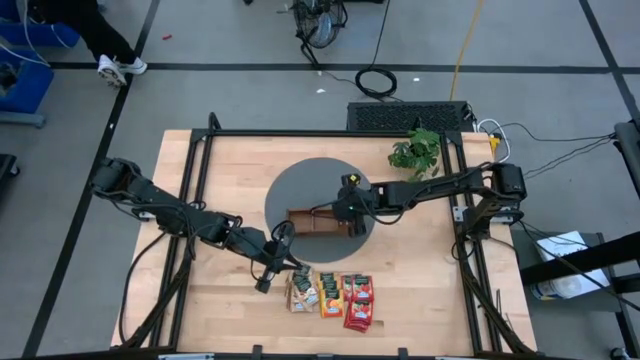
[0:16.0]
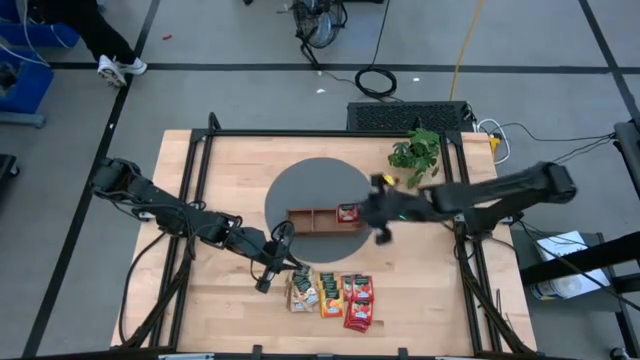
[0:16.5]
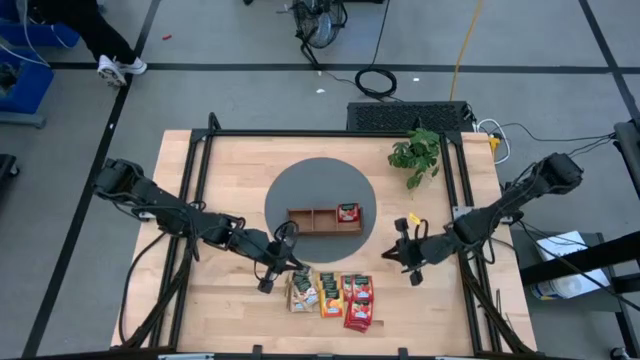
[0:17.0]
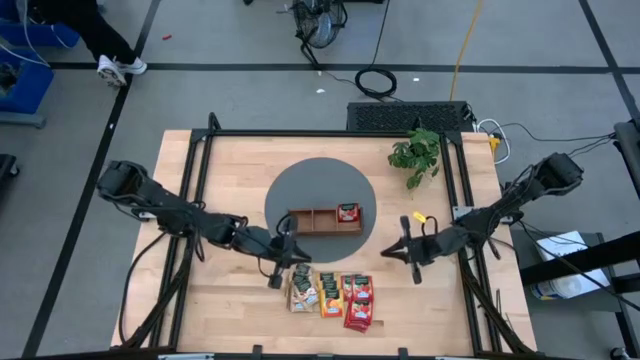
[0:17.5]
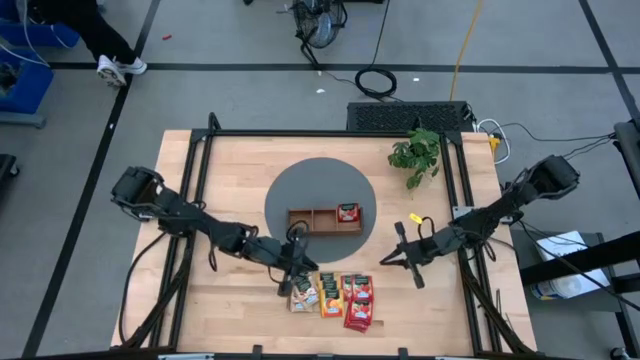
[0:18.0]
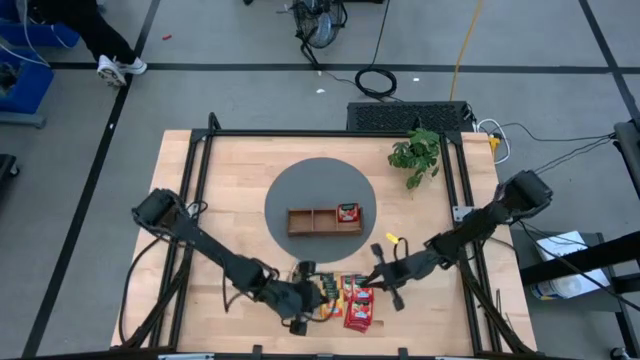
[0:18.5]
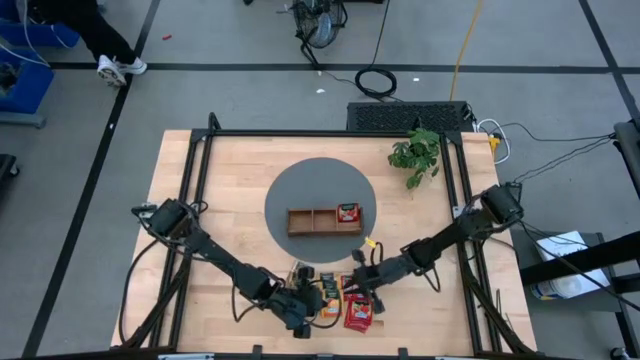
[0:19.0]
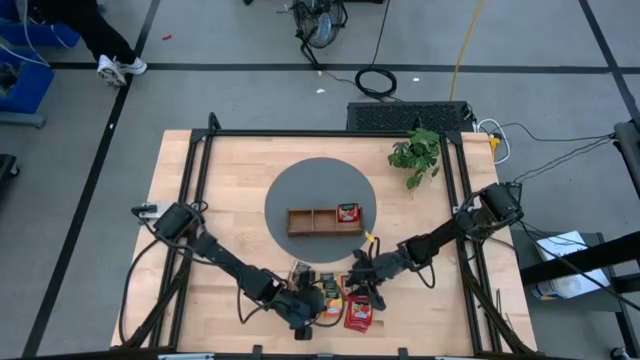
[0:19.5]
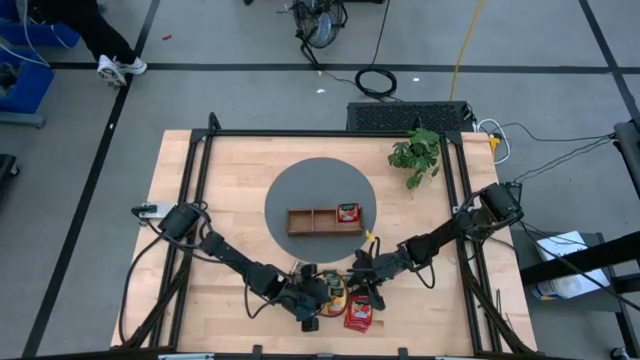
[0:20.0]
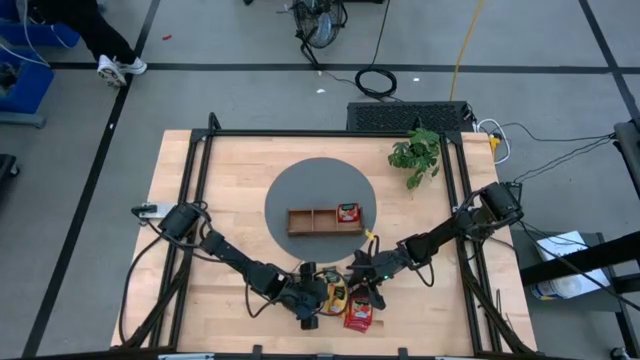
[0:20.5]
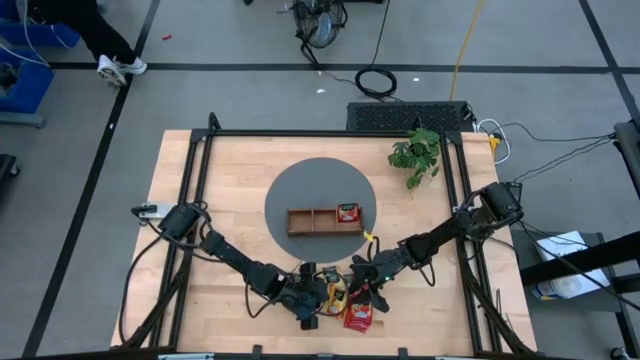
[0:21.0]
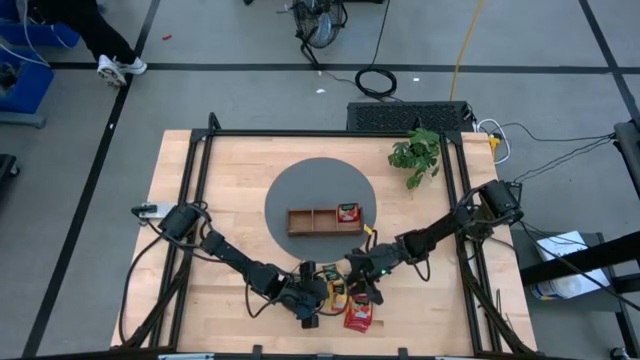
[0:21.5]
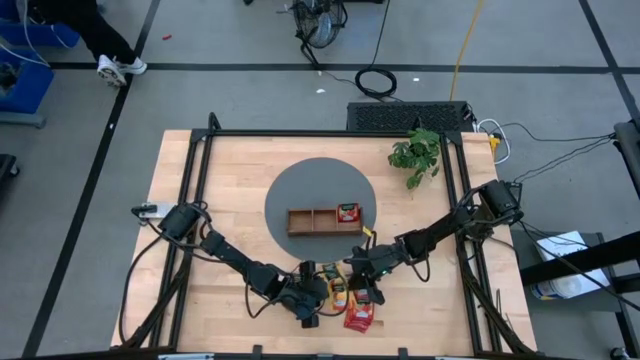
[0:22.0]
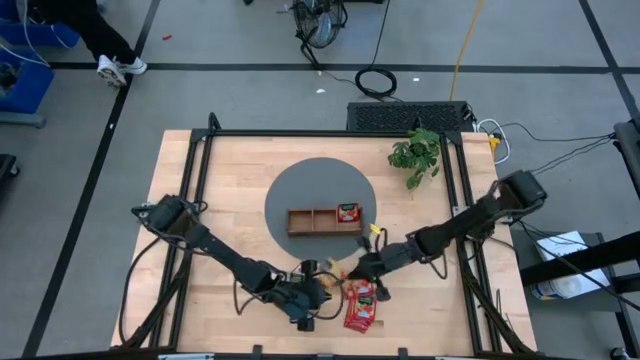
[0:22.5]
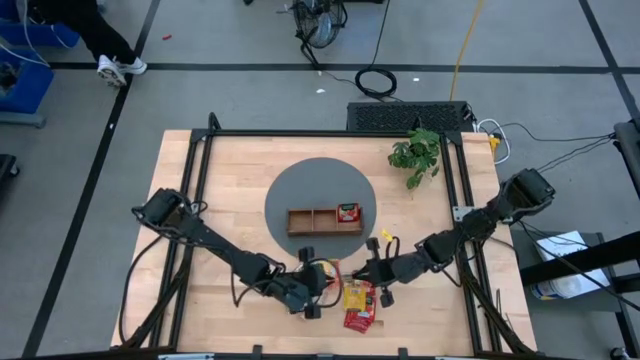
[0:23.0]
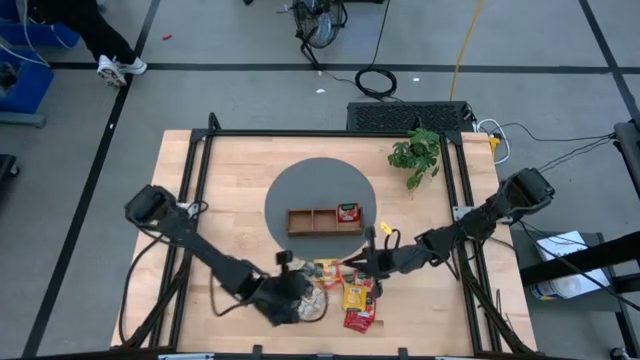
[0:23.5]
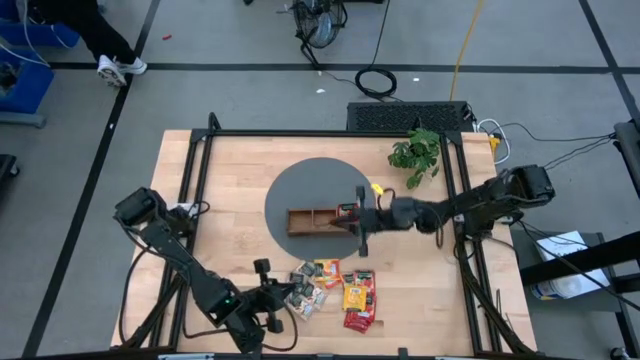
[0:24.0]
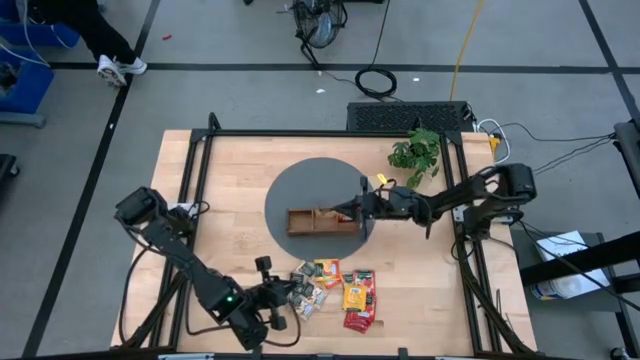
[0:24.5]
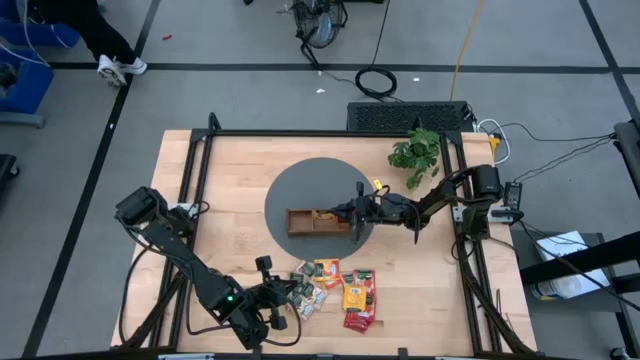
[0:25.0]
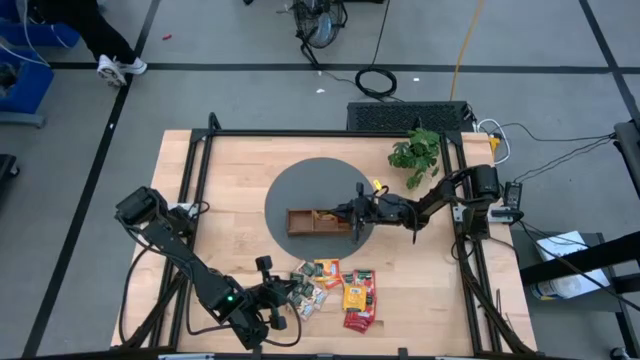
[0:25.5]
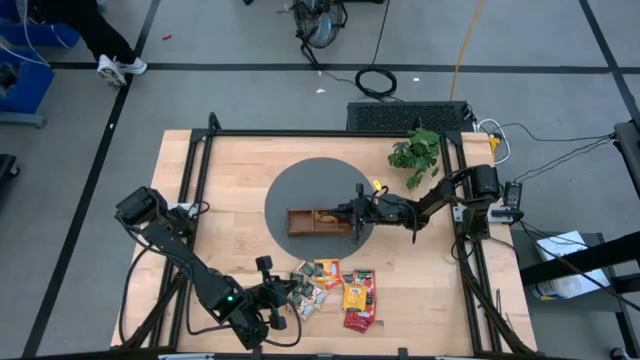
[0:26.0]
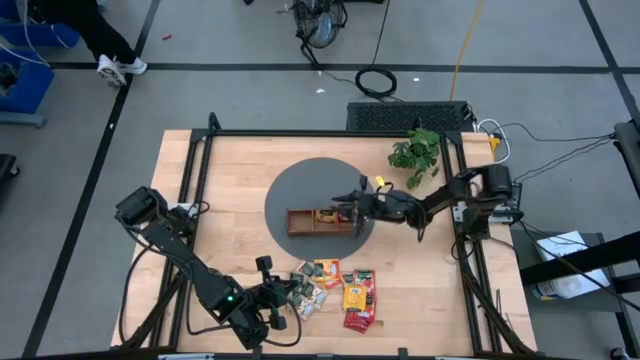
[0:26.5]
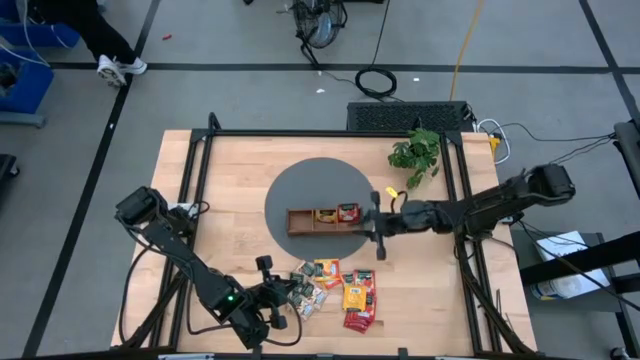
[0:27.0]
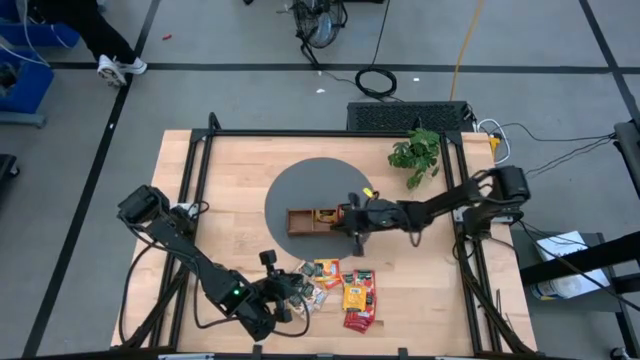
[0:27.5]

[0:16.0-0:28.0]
Task: Pick & Place Tea
Put the orange tea bag into the middle slot of the wooden organizer

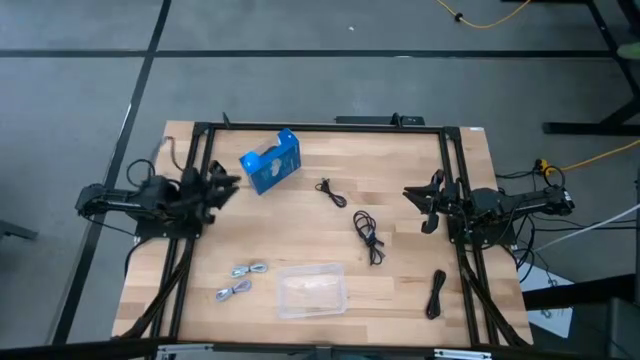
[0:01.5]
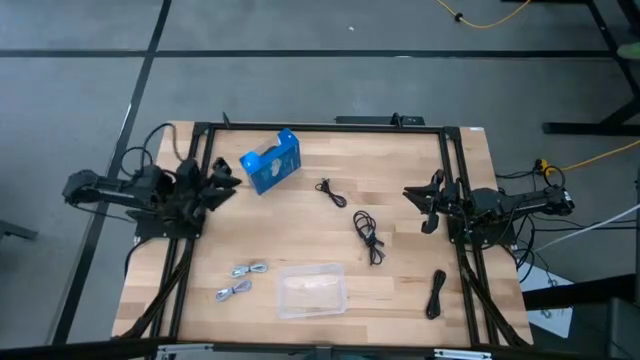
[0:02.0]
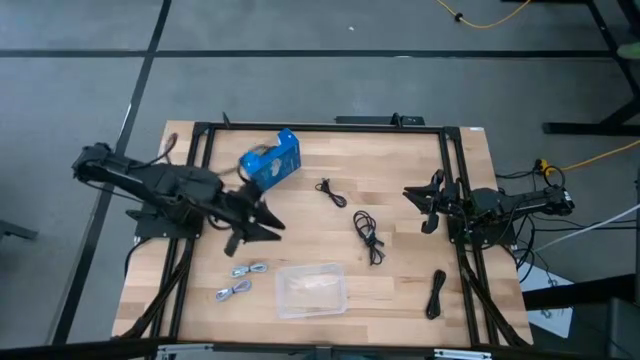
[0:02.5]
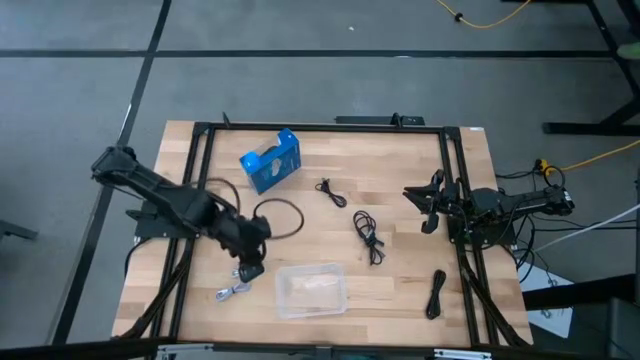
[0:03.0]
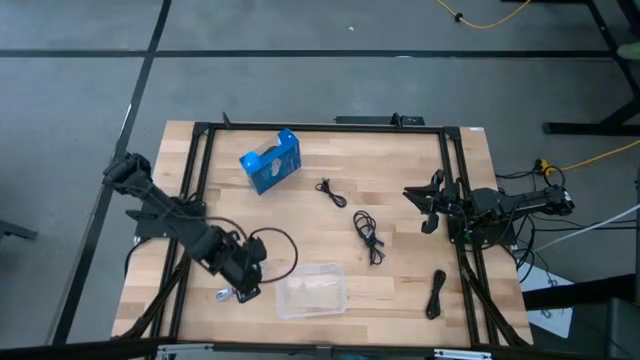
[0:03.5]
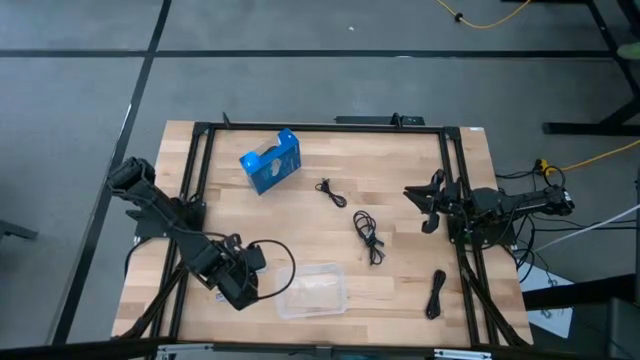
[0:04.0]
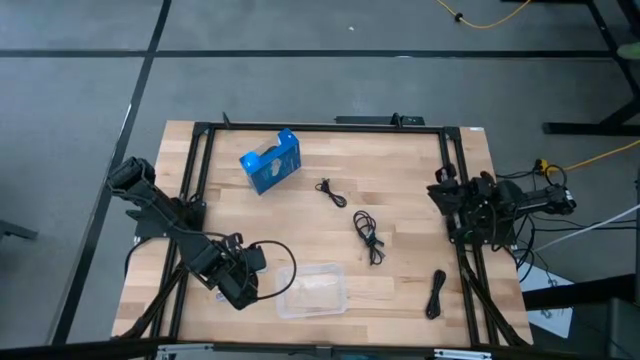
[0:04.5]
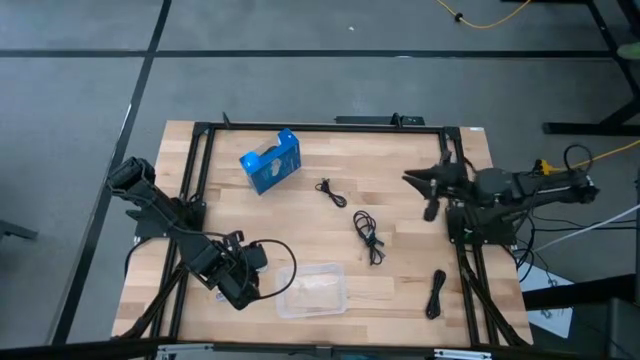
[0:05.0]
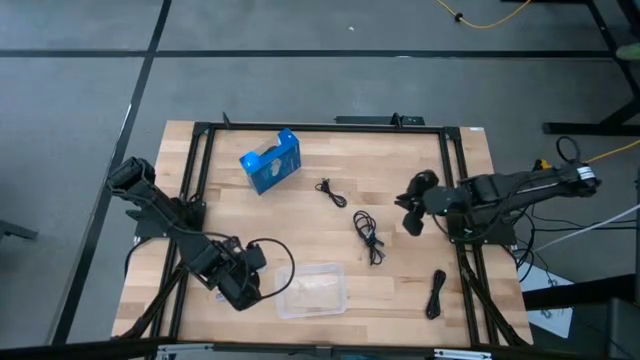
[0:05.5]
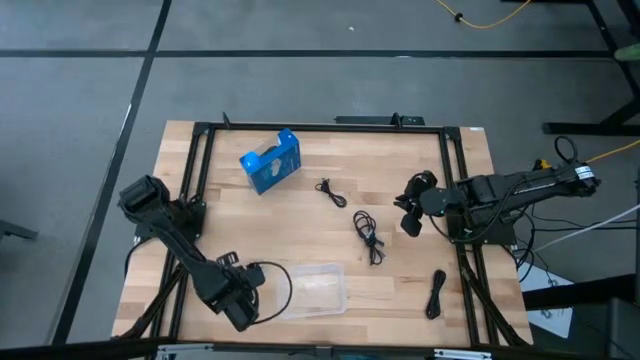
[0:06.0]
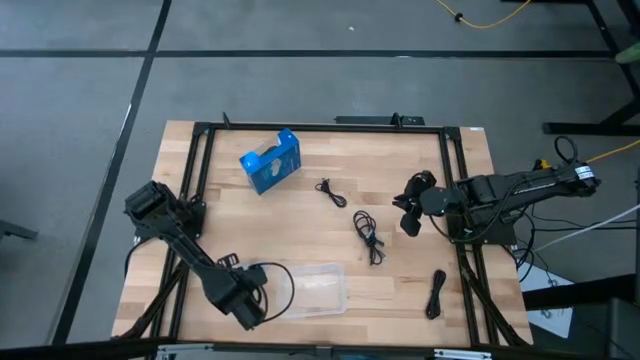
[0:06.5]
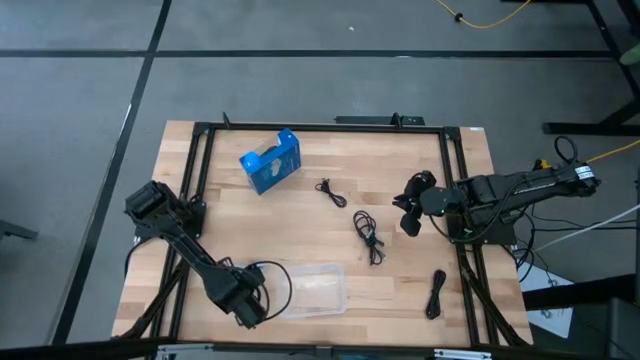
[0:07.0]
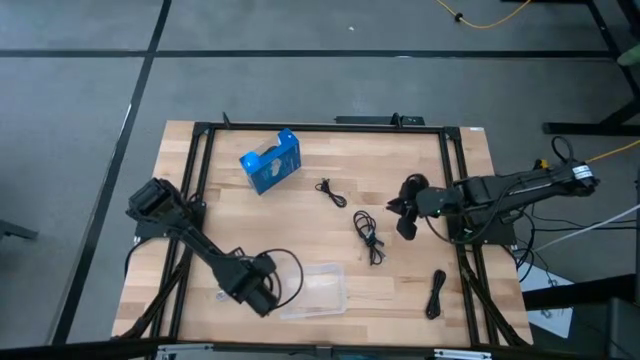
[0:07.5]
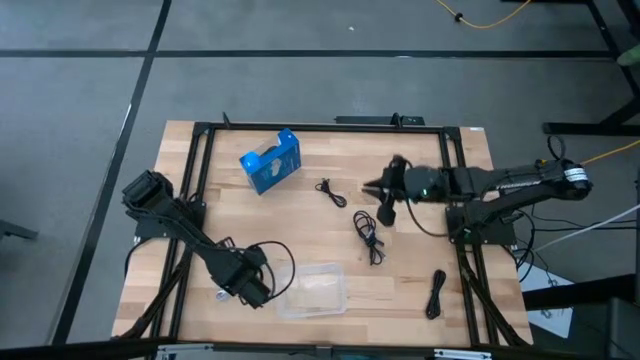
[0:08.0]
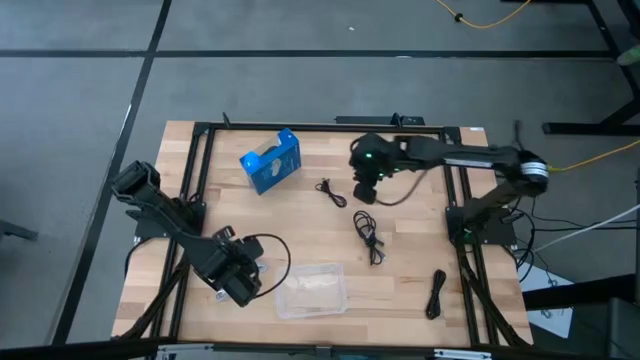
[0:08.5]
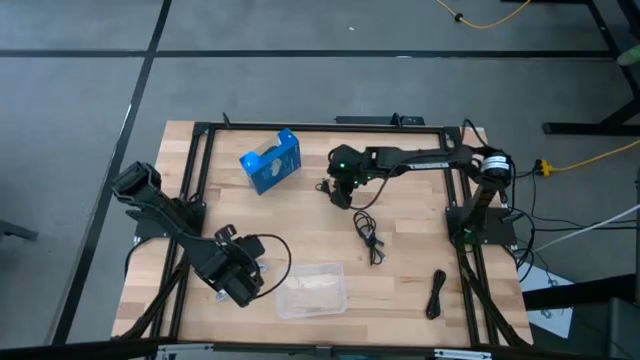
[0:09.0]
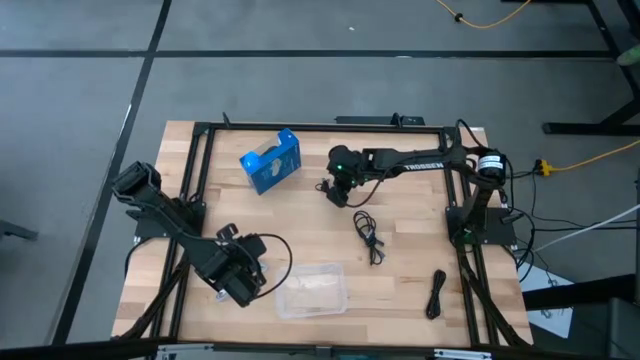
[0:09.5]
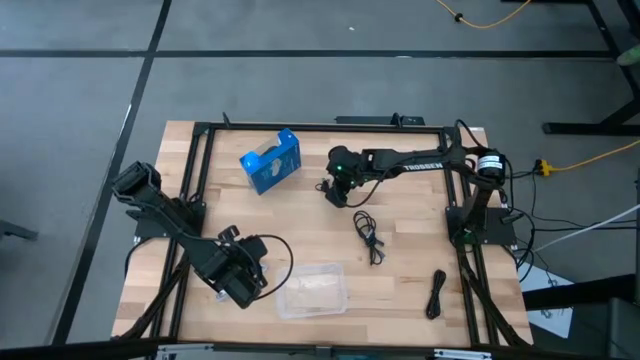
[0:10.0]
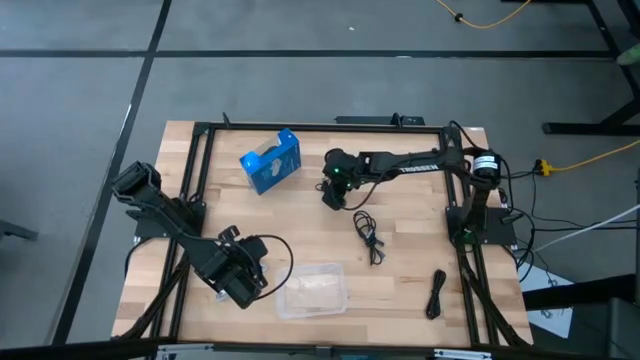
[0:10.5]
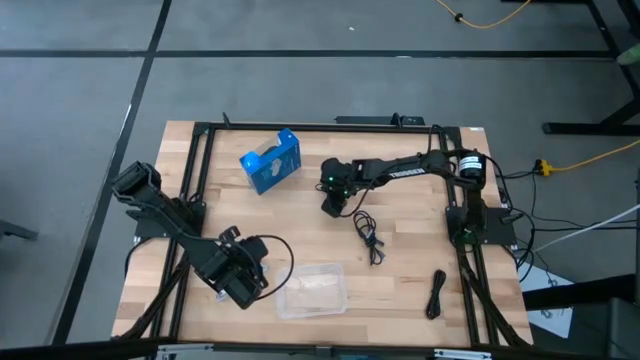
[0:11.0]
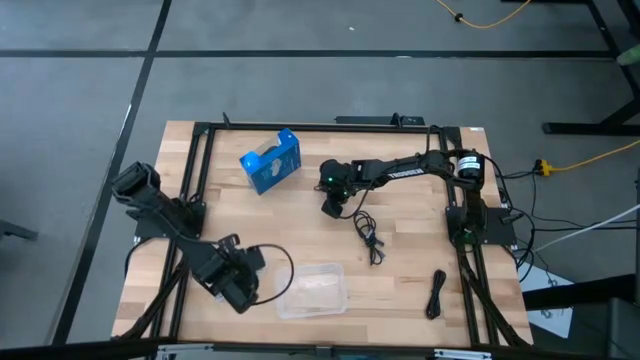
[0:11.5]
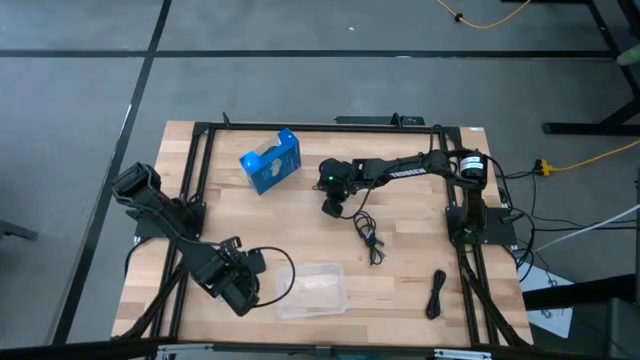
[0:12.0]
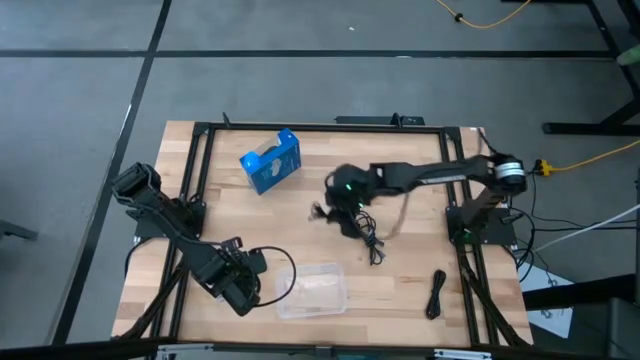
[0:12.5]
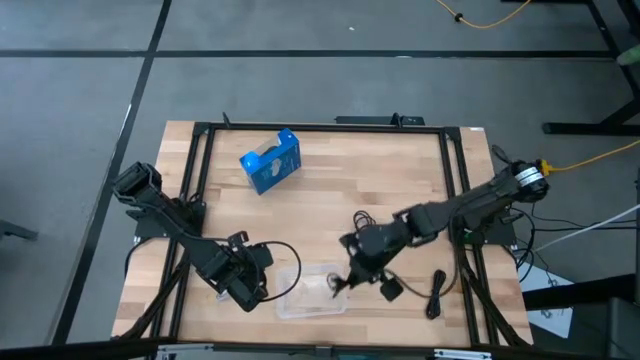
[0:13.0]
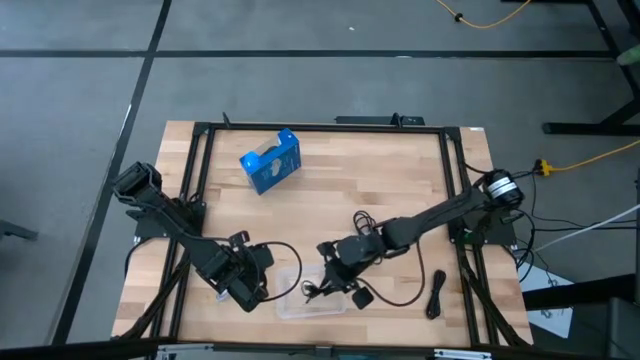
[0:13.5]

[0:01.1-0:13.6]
Task: Pick and place USB-C Cables
Put the top black charger cable into the transparent bin
